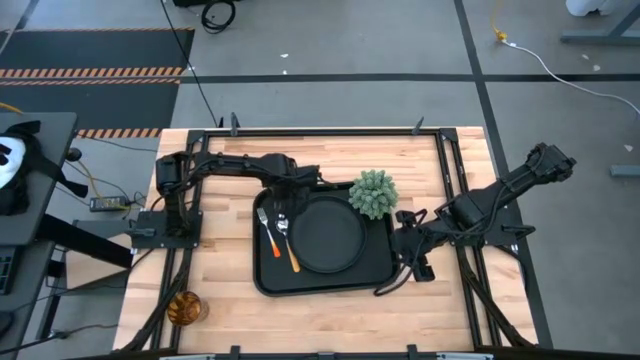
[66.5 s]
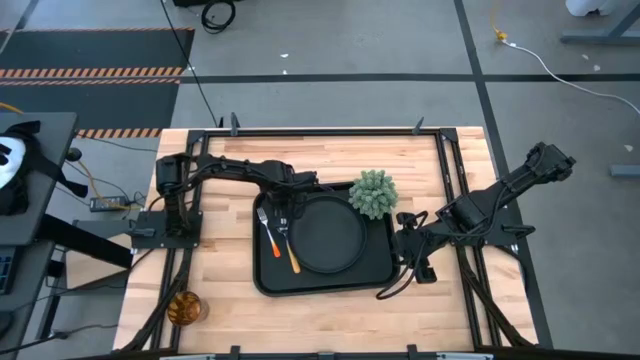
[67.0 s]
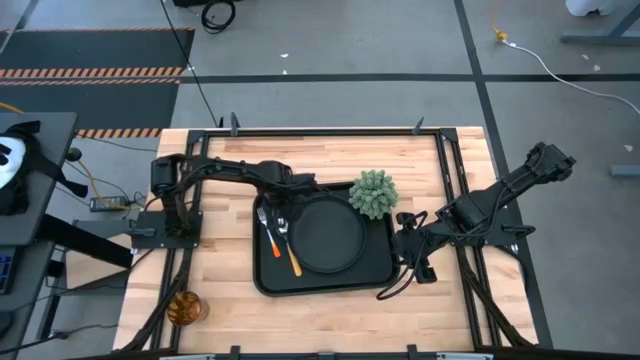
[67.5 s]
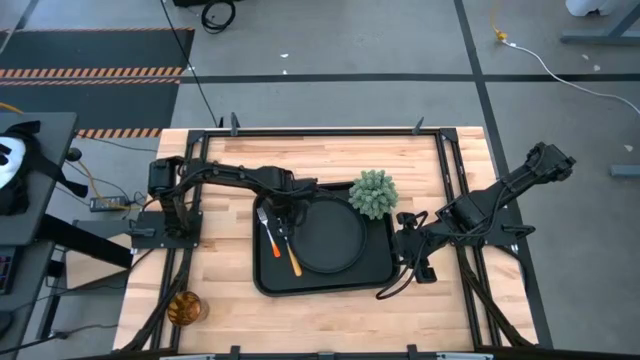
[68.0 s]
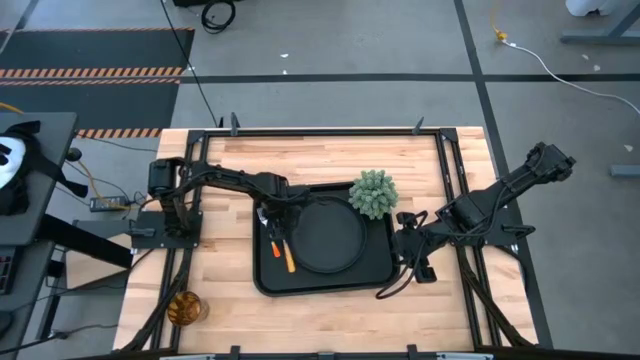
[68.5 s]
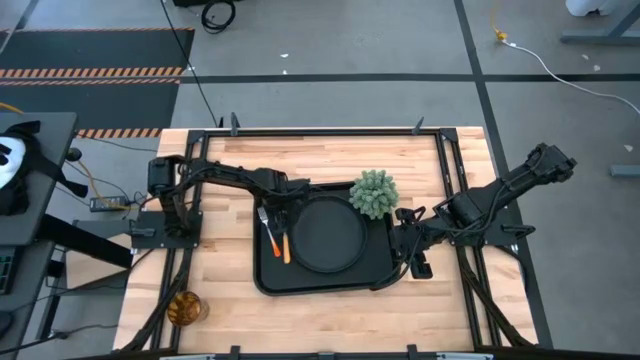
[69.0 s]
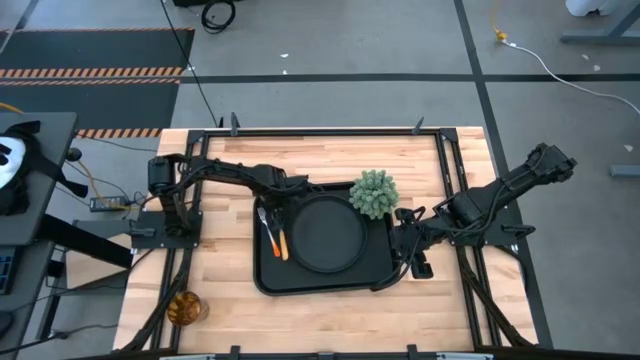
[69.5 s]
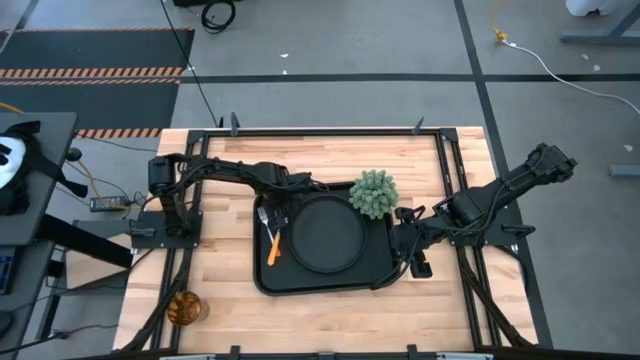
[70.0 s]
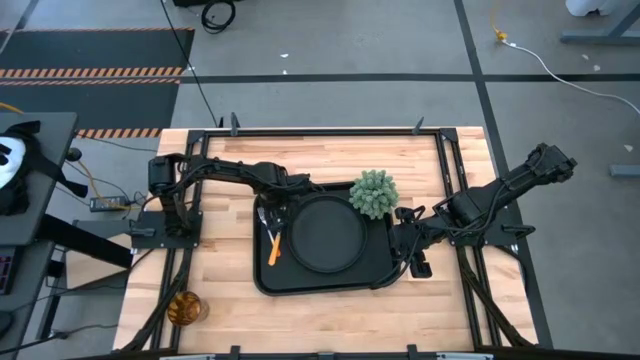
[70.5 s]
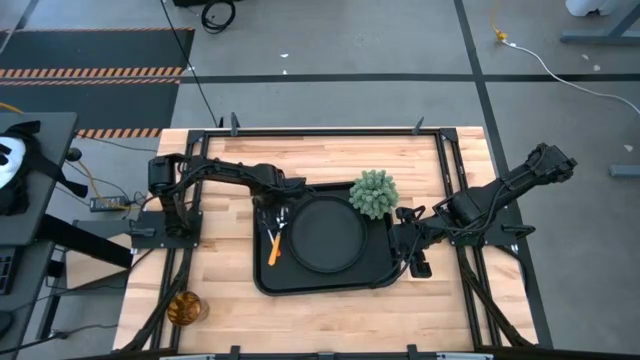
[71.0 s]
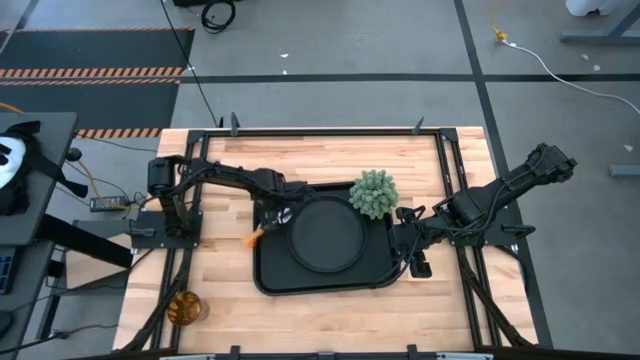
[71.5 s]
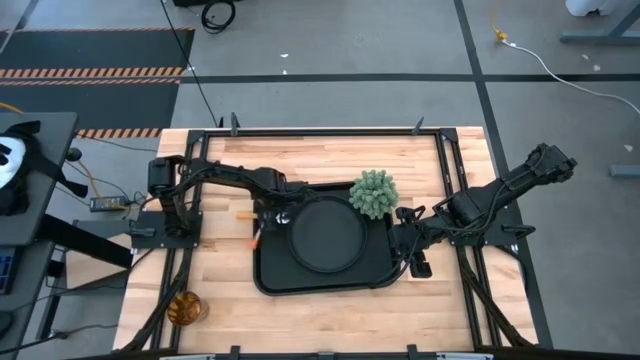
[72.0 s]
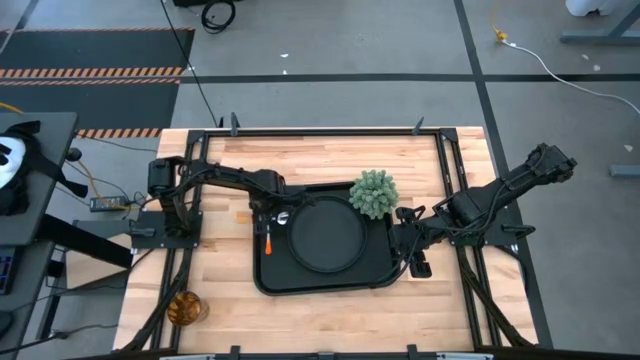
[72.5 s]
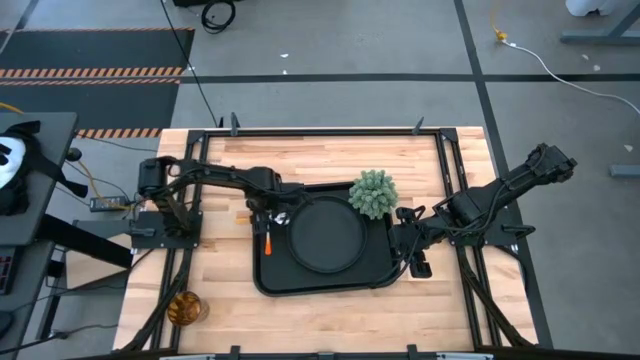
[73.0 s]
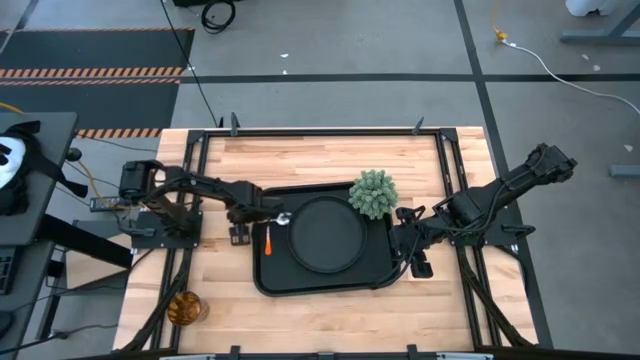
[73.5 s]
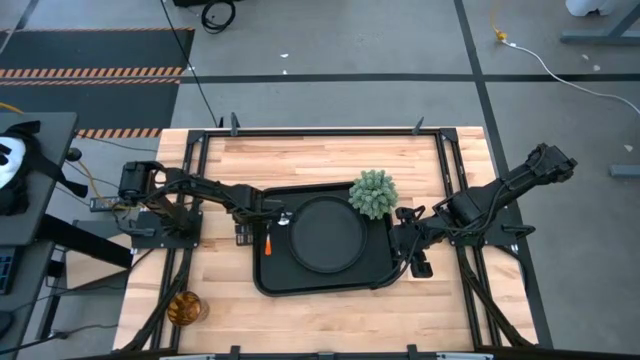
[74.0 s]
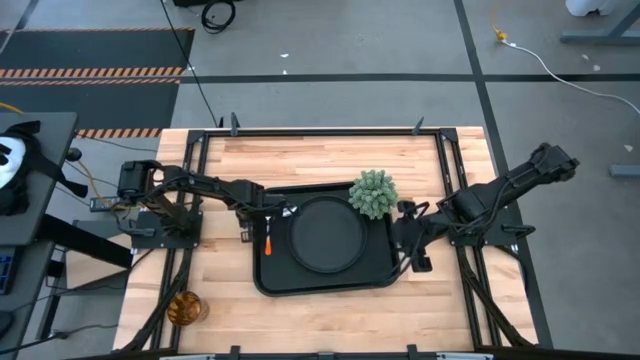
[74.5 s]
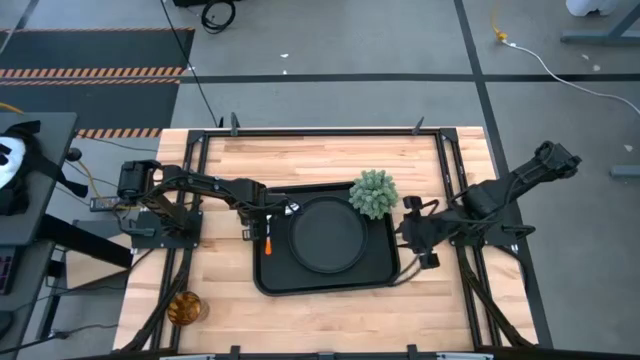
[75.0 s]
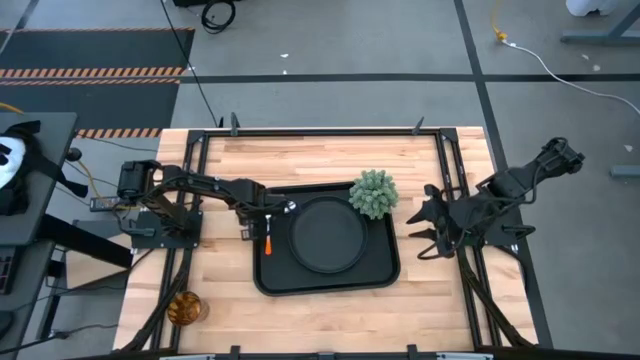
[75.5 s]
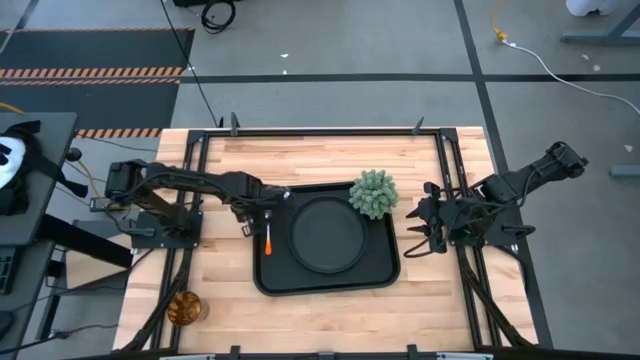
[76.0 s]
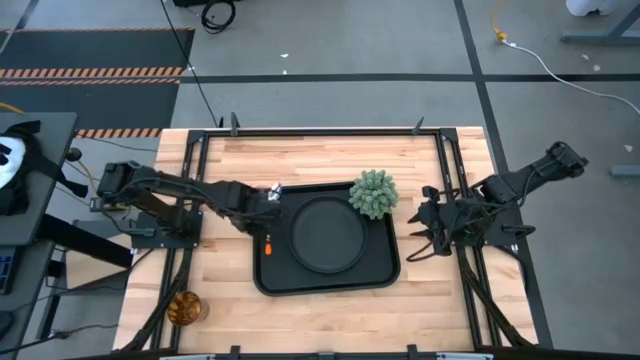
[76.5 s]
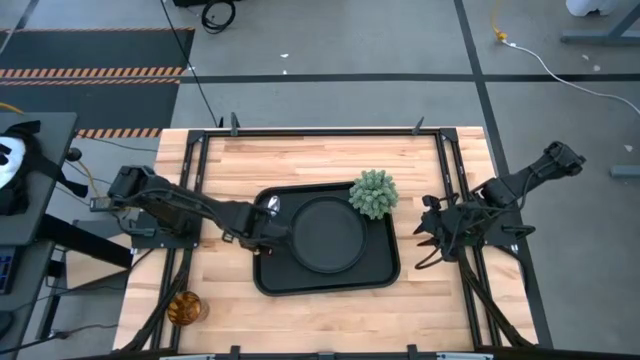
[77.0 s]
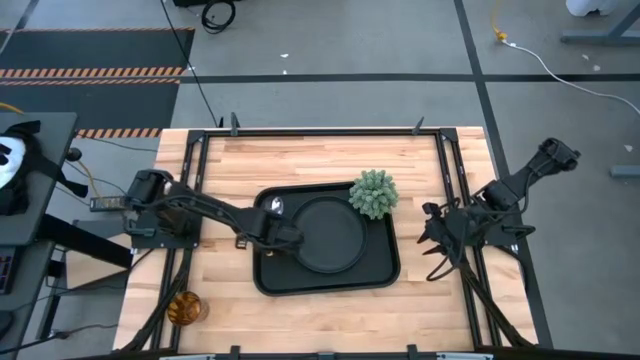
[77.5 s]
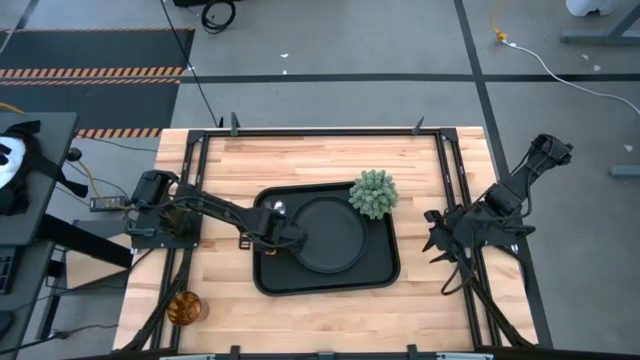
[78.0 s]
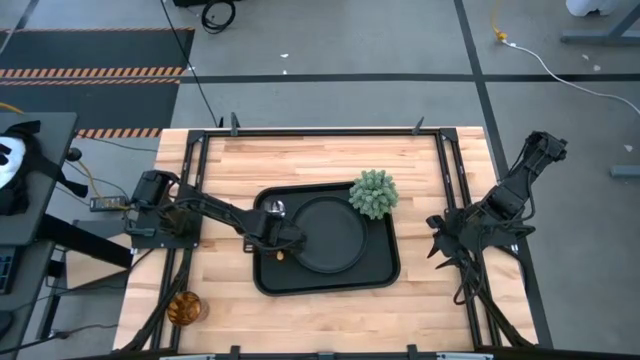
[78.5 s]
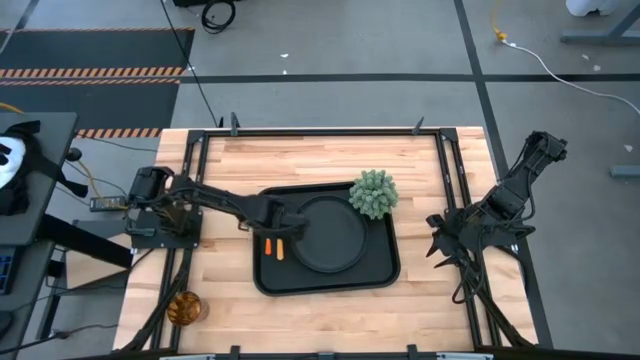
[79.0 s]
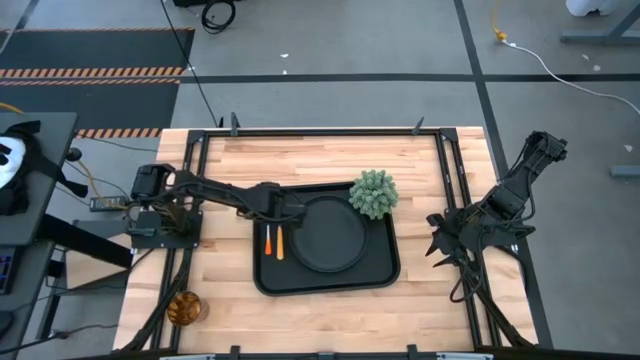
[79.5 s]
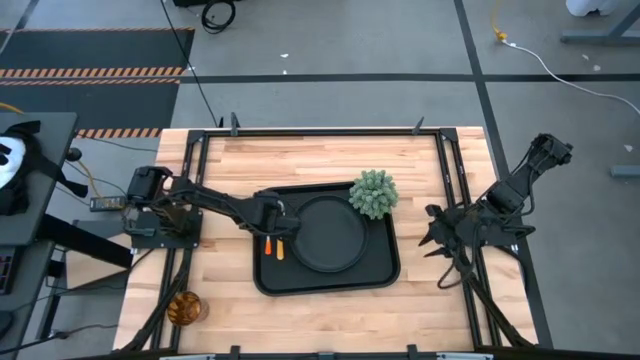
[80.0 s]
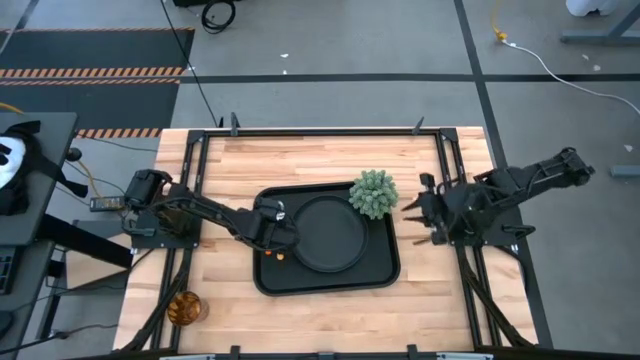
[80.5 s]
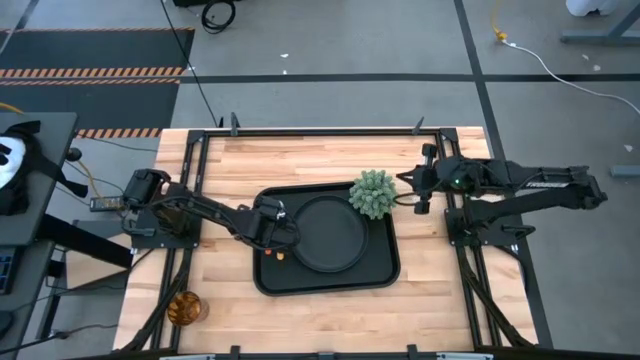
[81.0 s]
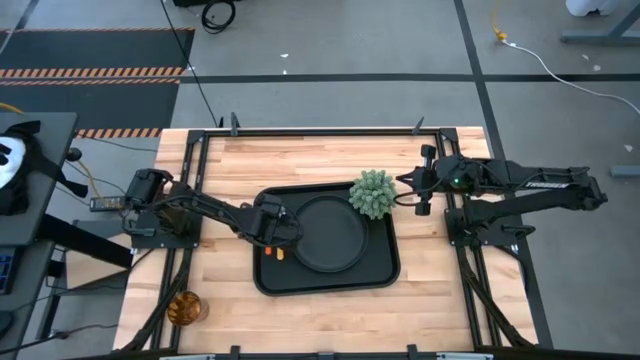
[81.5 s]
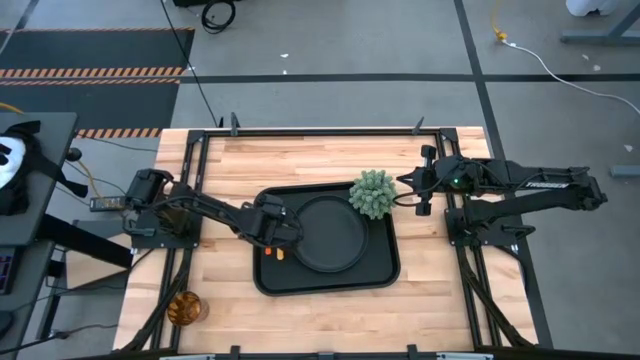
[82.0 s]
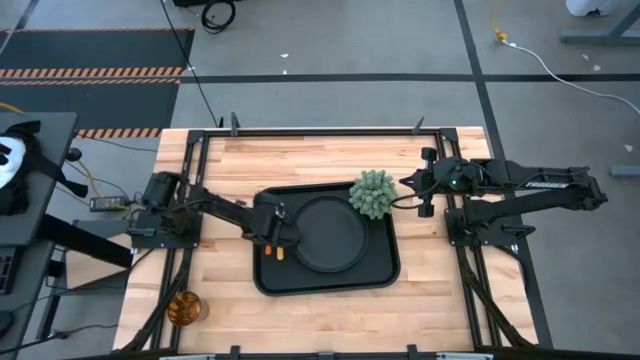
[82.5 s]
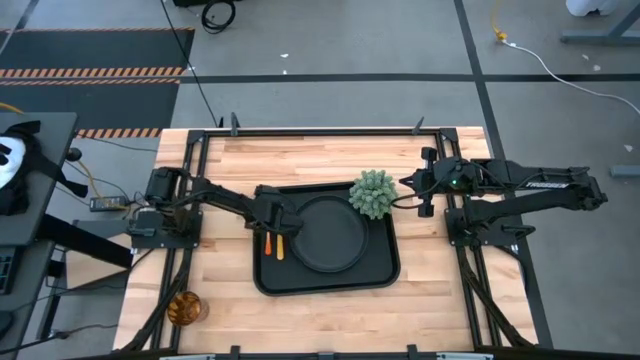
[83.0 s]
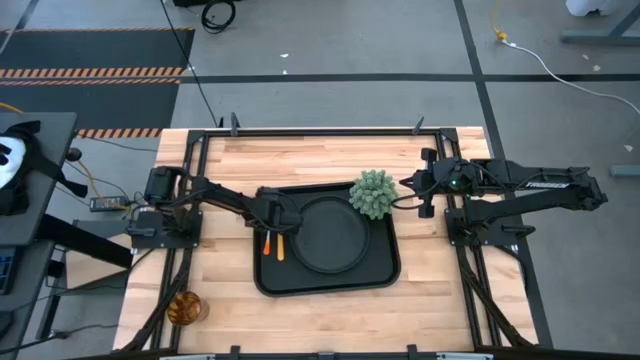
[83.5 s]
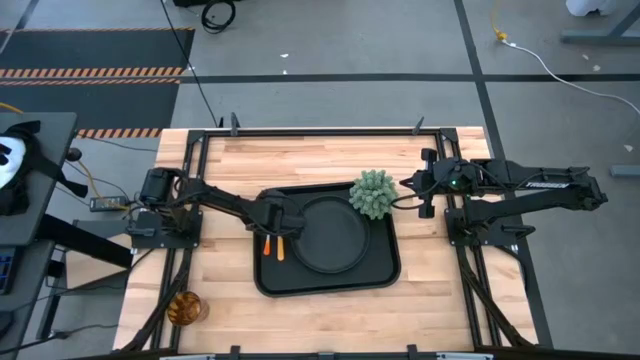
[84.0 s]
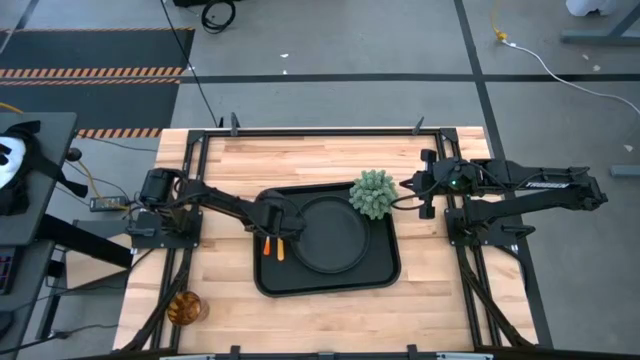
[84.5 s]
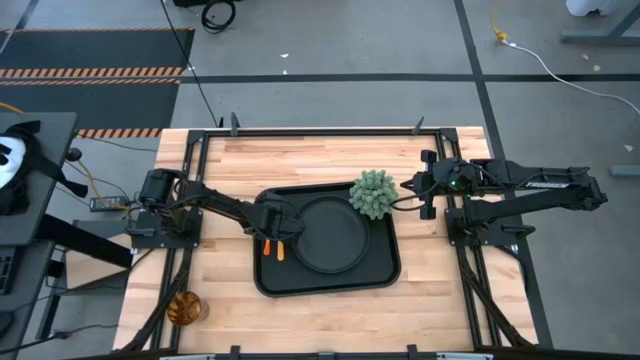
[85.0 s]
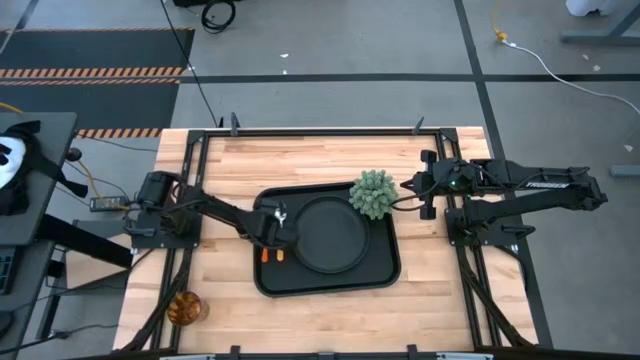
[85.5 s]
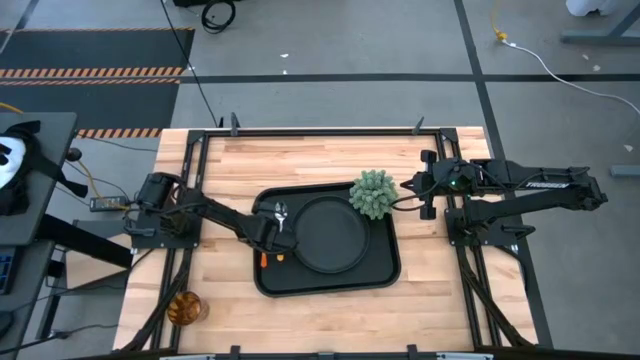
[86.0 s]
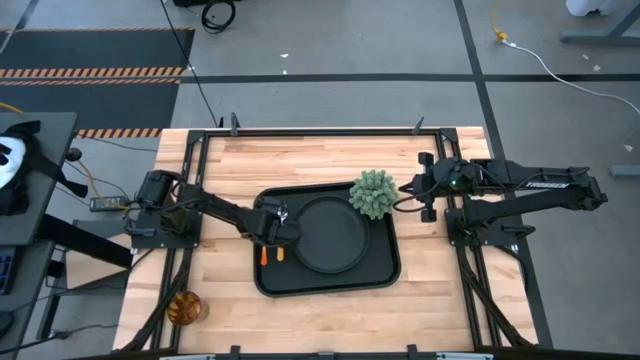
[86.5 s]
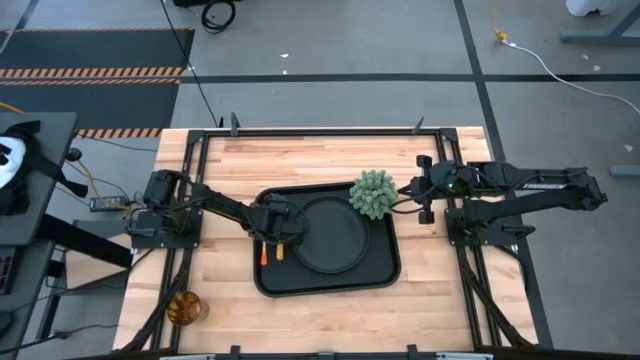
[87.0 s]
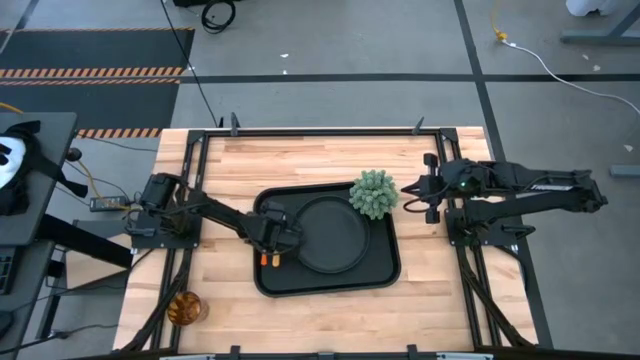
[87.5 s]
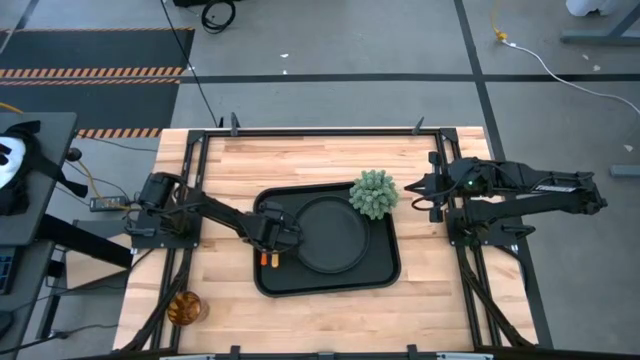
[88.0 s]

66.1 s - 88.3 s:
Task: Pick and place plate/cup/fork/spoon on tray
Adjust the utensils on the black tray
